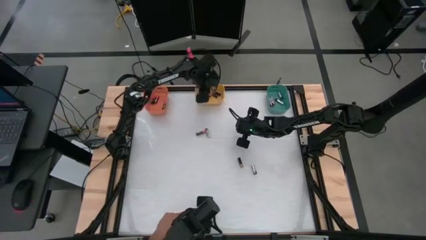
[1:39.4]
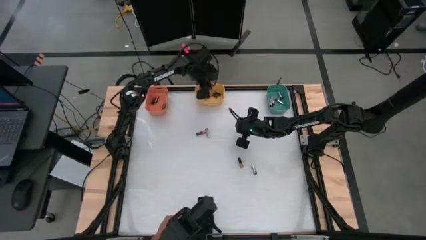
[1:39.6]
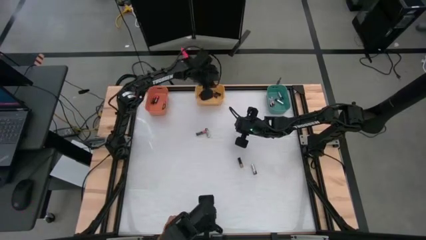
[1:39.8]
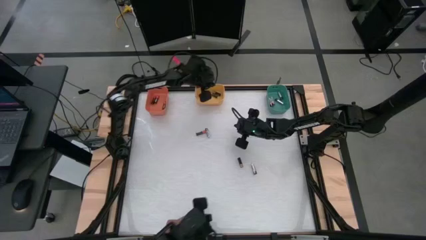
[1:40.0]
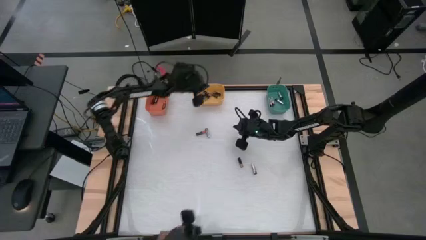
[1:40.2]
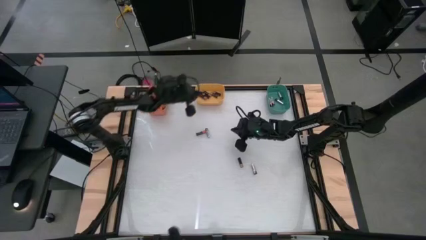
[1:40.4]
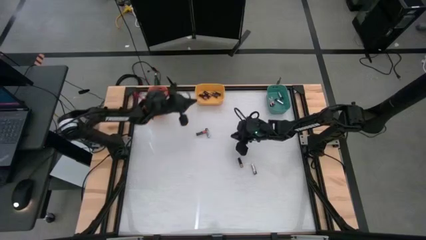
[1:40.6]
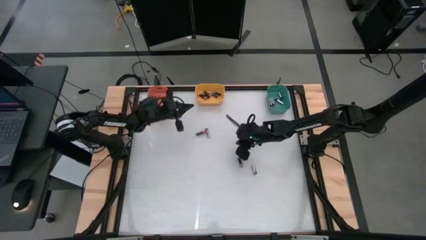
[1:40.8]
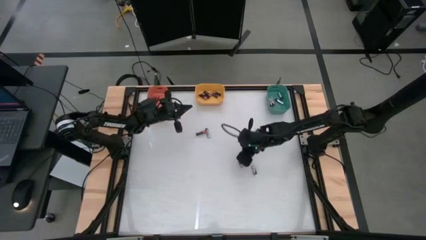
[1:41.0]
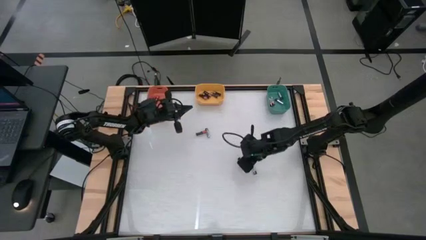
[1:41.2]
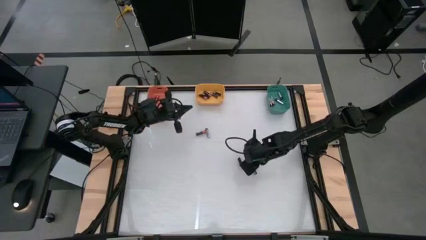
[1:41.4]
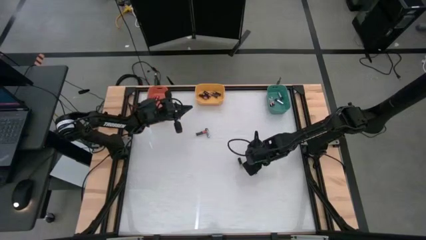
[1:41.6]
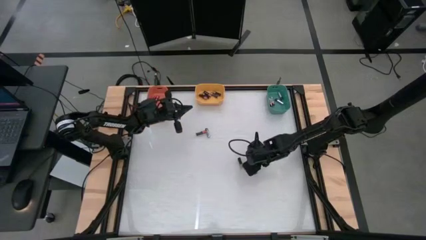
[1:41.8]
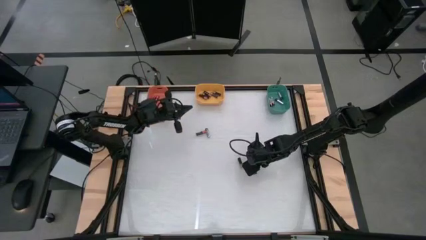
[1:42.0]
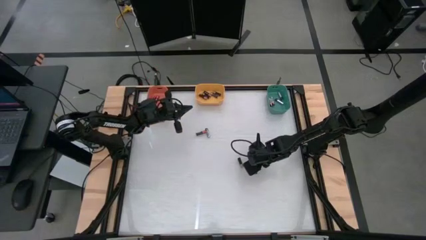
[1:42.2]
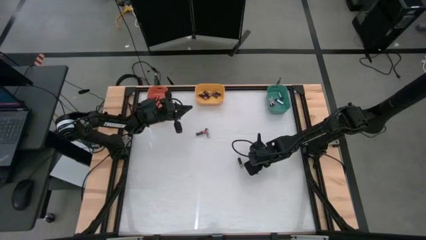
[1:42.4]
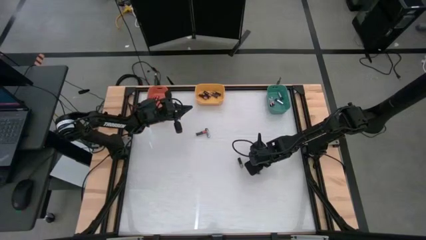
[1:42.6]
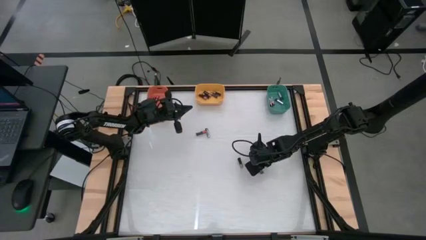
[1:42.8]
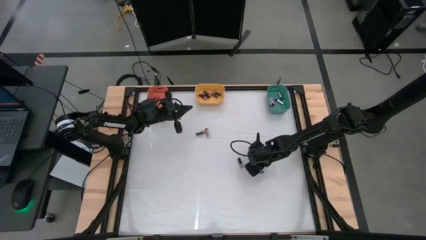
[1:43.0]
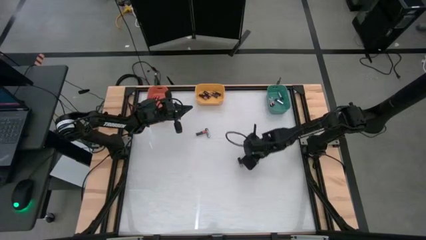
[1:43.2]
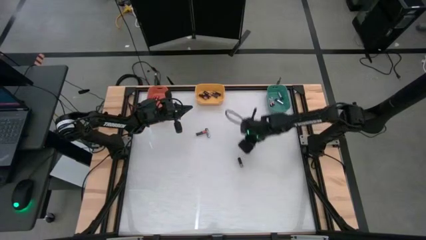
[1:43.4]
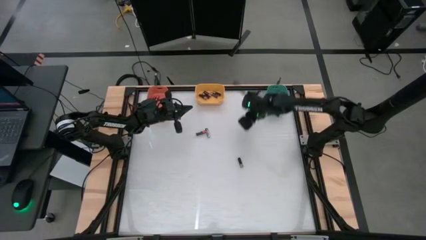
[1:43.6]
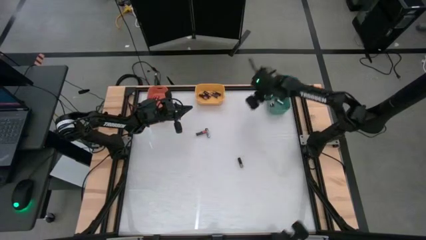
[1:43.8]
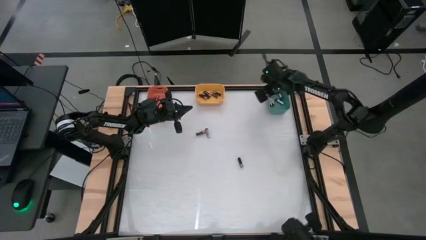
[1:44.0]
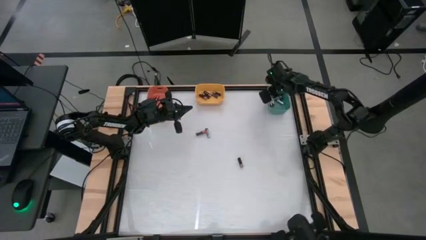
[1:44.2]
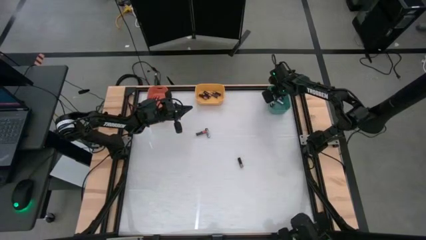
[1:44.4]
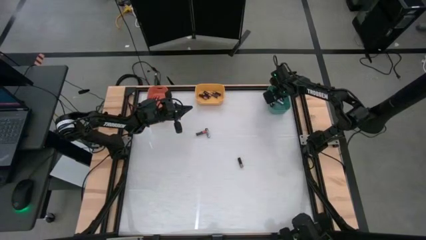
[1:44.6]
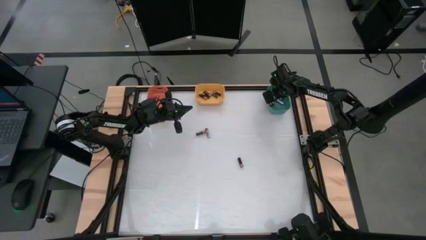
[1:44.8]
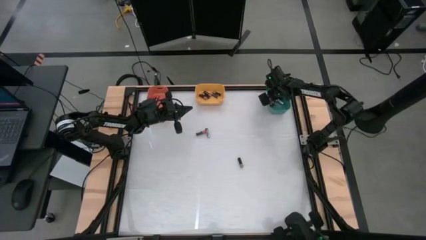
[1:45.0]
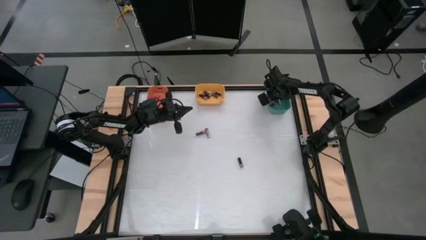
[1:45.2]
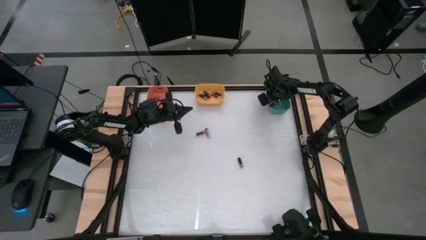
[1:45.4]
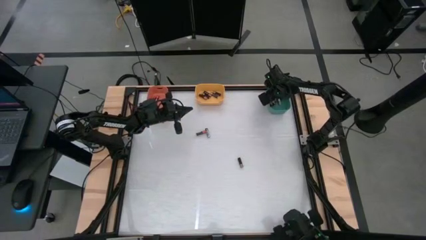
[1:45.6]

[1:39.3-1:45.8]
Task: Sort batteries
Put the black battery into the green bin

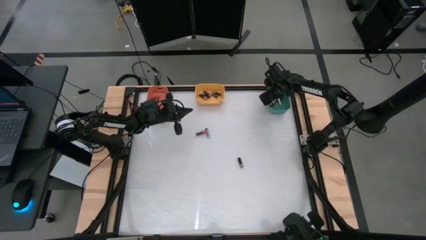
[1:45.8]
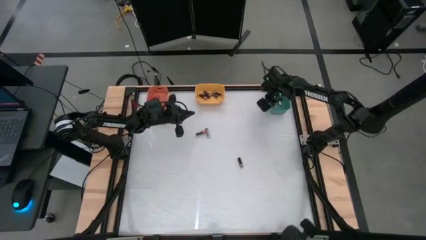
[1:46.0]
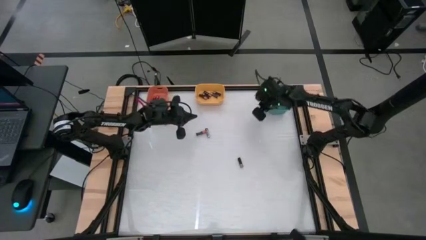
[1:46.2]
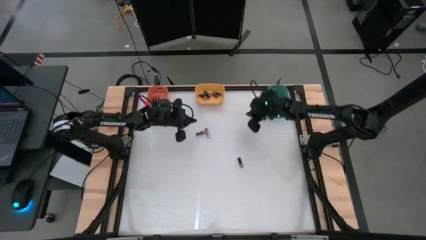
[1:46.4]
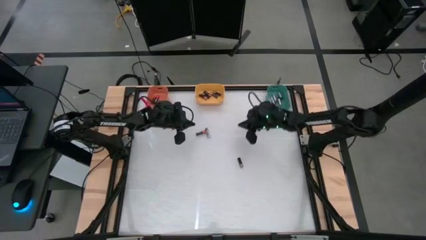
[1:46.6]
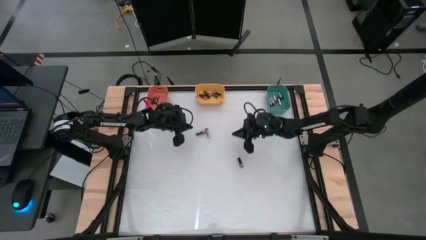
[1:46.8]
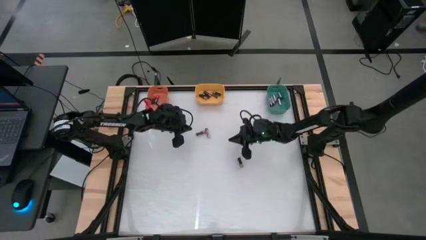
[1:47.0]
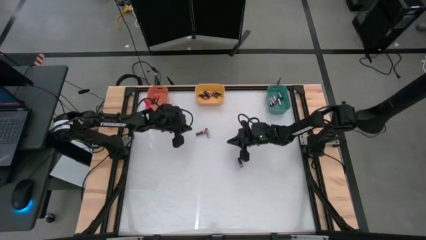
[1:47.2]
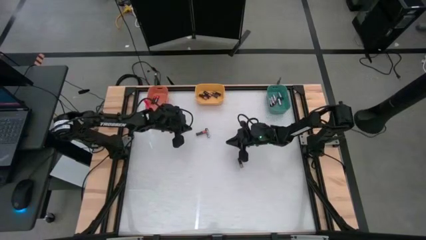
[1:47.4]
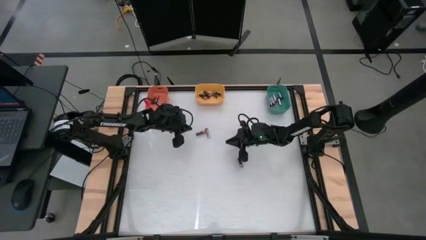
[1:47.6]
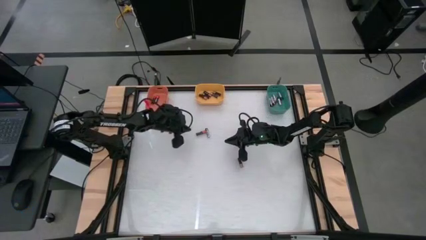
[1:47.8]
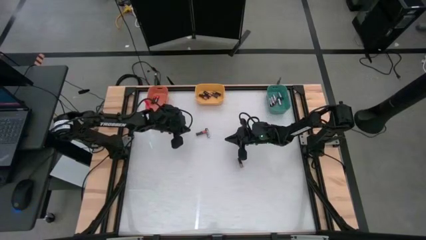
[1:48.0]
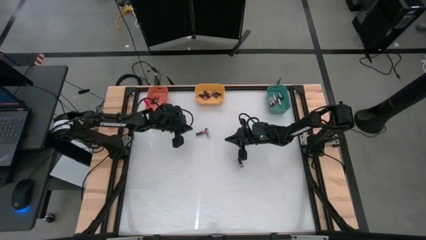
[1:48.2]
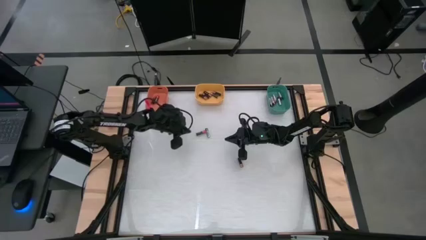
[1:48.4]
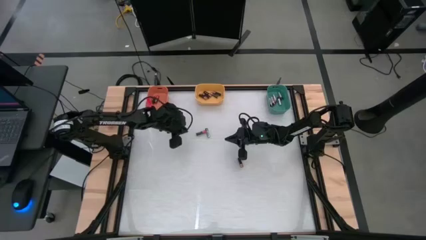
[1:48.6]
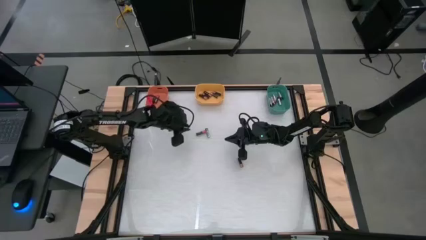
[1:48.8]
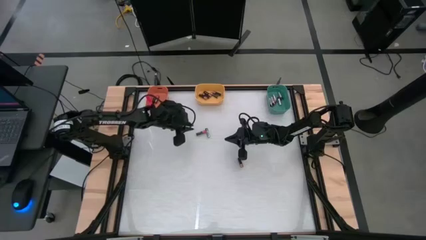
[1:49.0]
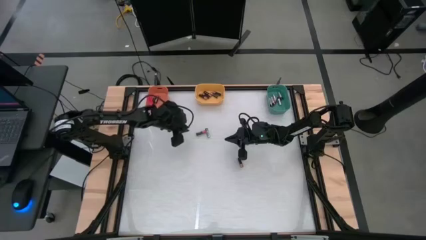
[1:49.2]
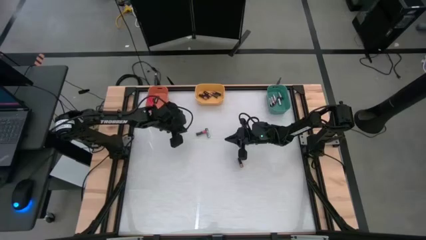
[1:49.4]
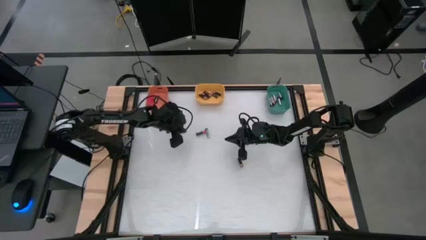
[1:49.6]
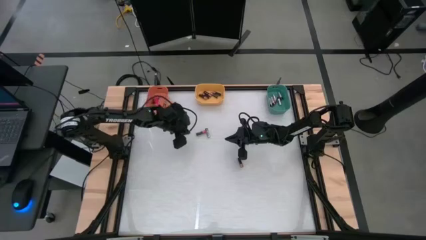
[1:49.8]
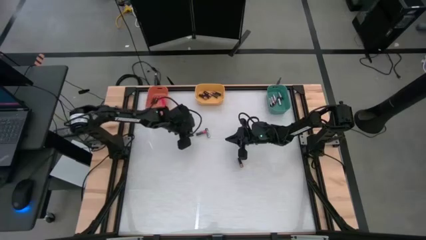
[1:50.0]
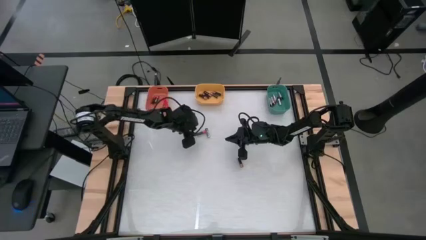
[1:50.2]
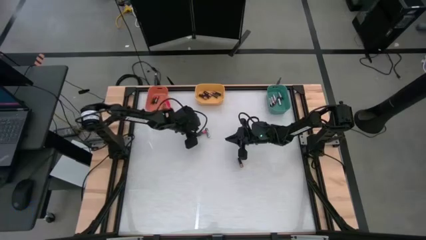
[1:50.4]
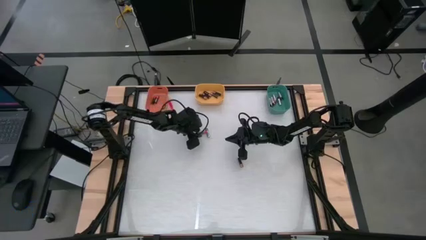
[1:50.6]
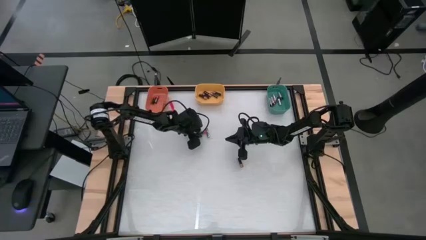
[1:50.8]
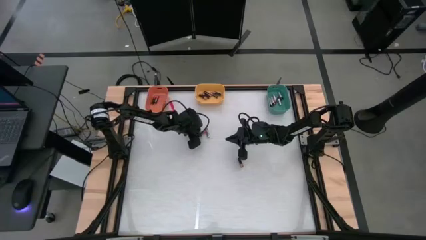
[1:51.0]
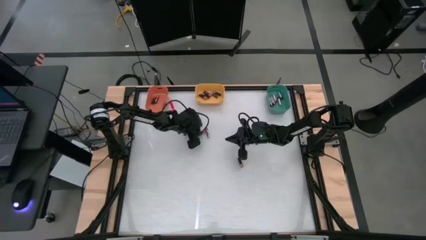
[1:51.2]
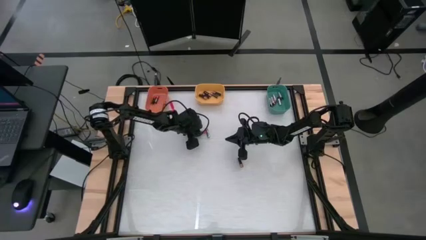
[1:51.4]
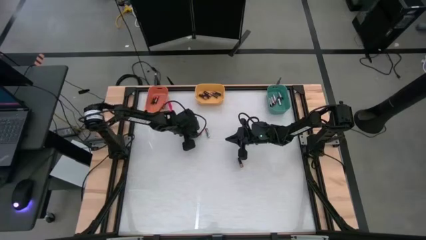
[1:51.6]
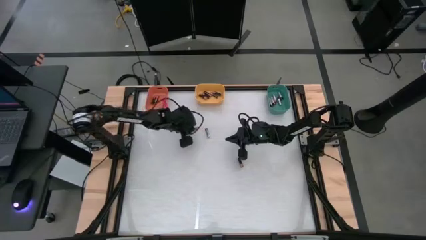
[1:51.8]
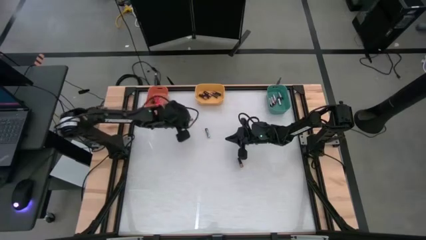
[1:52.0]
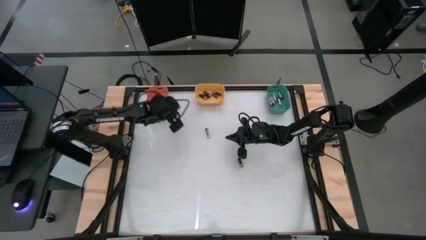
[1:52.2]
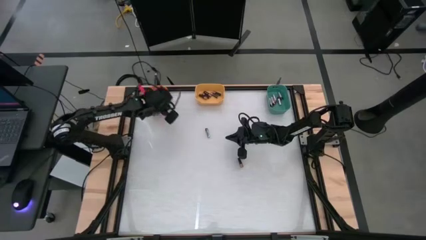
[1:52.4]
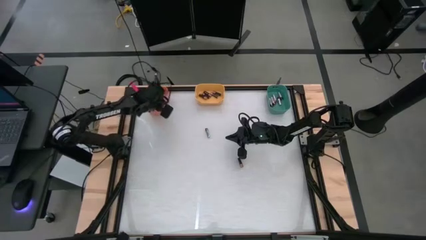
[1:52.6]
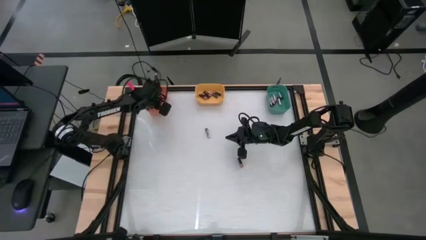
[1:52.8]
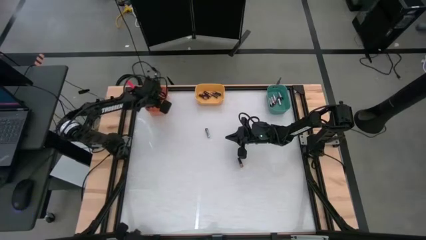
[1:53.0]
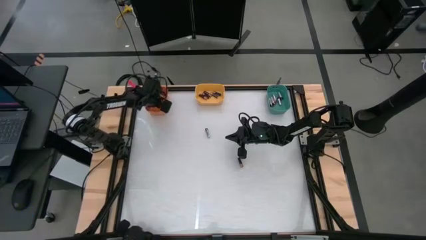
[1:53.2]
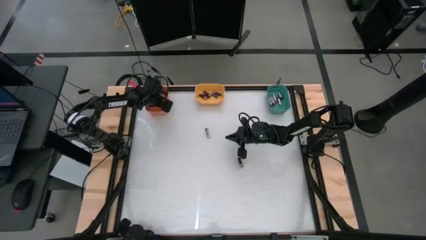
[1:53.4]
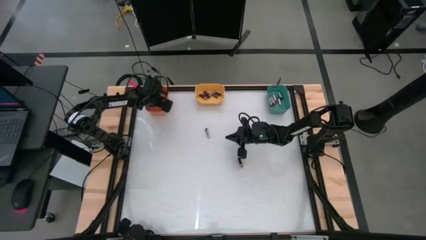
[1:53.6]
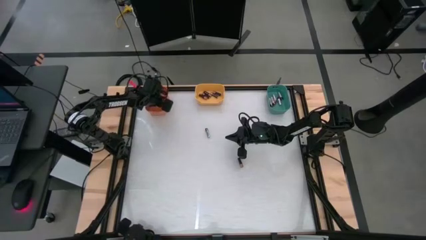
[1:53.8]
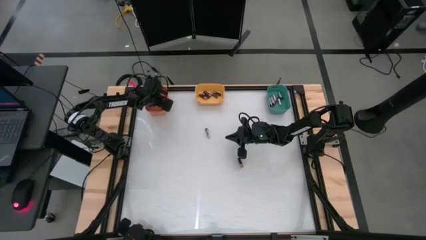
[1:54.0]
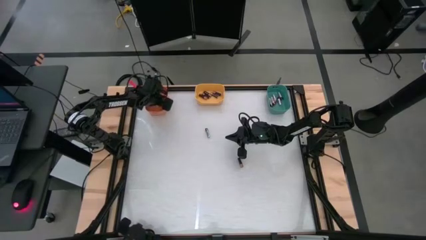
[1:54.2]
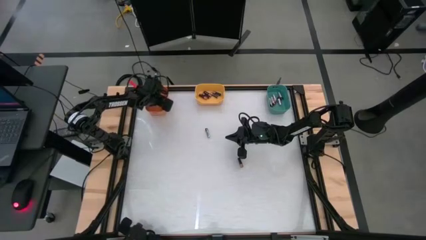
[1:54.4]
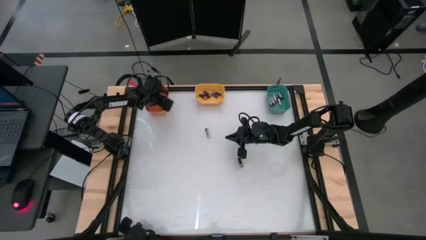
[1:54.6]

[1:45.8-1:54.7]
Put the red battery into the orange bin
